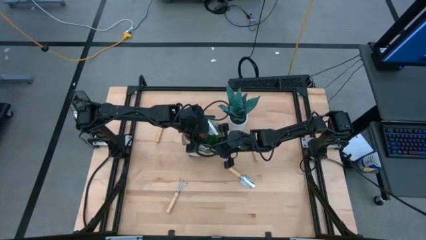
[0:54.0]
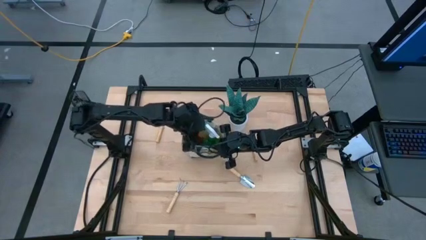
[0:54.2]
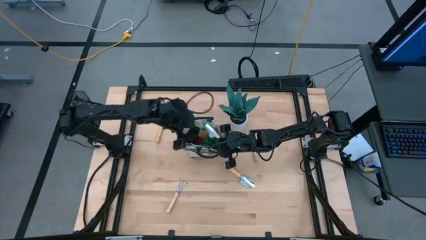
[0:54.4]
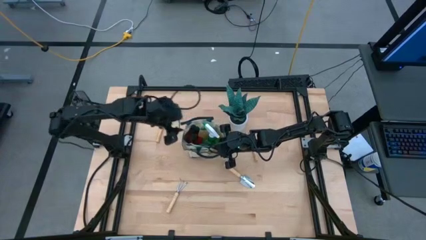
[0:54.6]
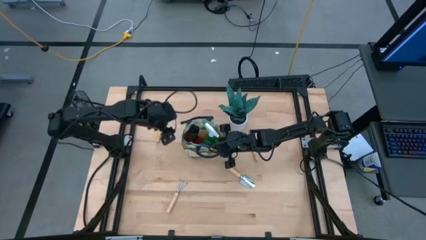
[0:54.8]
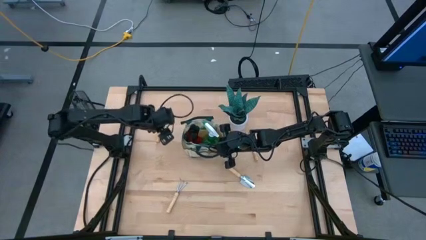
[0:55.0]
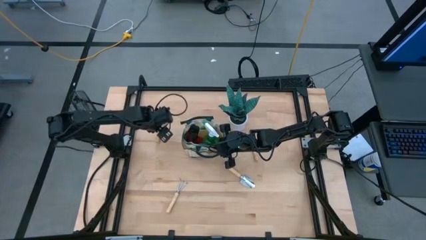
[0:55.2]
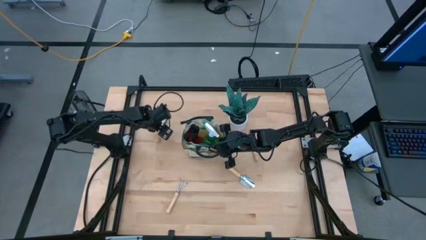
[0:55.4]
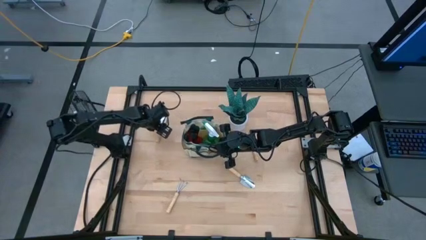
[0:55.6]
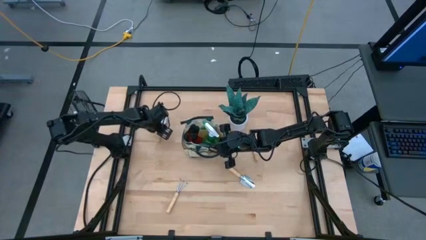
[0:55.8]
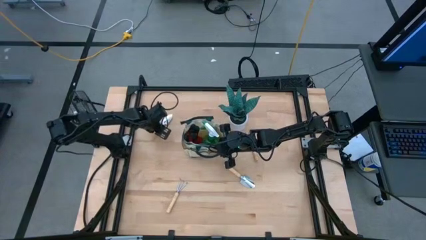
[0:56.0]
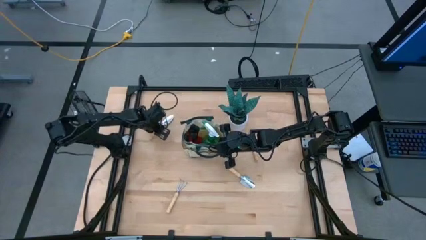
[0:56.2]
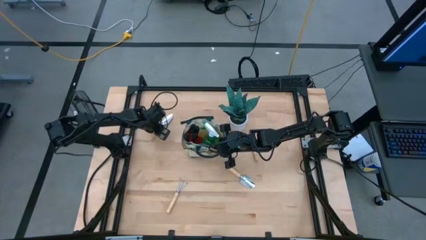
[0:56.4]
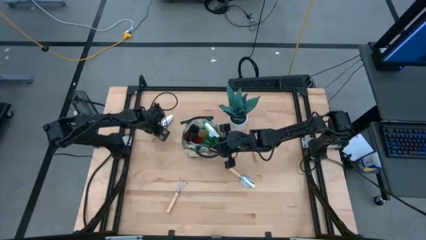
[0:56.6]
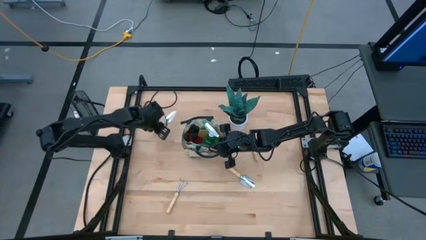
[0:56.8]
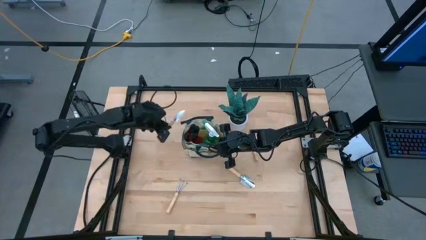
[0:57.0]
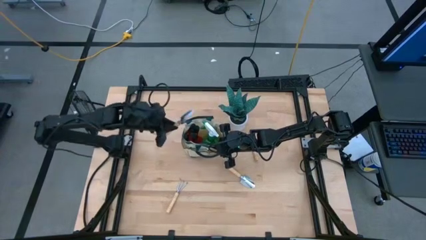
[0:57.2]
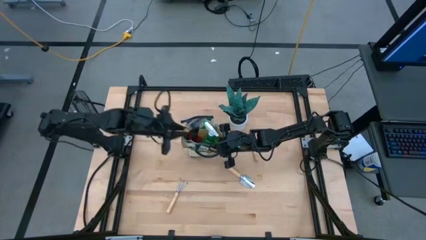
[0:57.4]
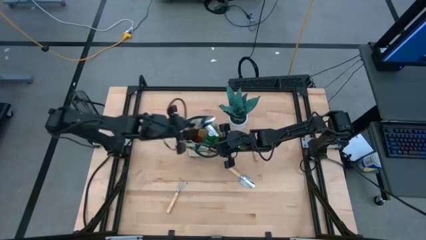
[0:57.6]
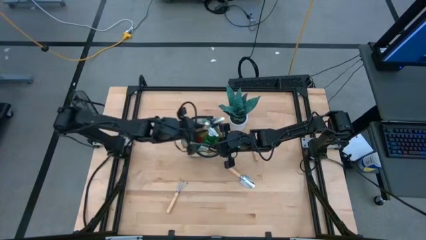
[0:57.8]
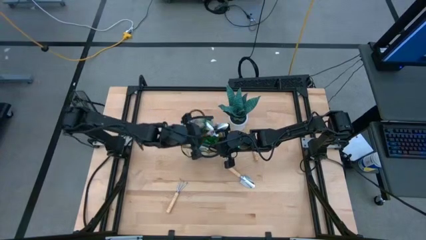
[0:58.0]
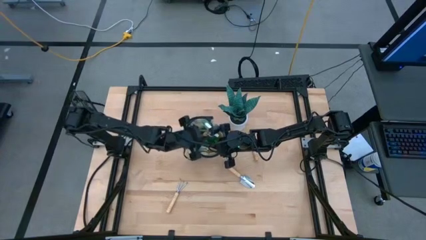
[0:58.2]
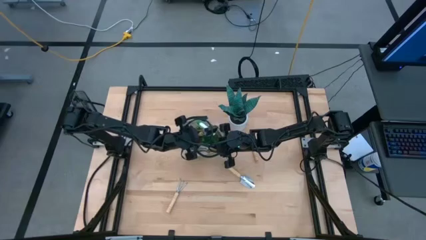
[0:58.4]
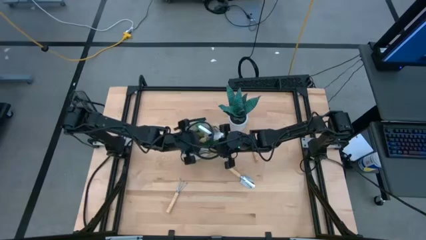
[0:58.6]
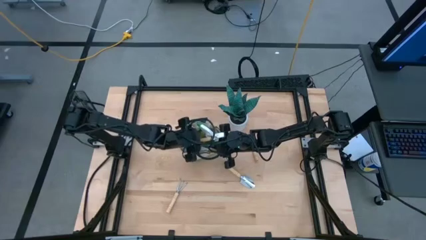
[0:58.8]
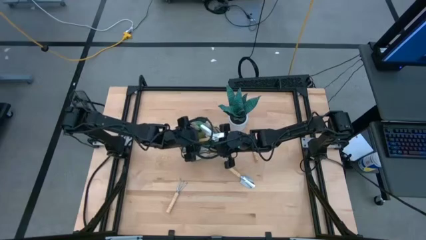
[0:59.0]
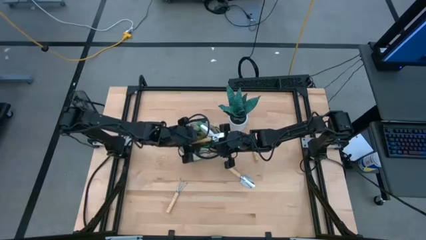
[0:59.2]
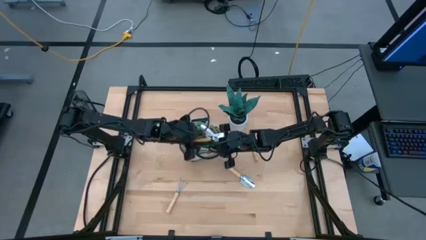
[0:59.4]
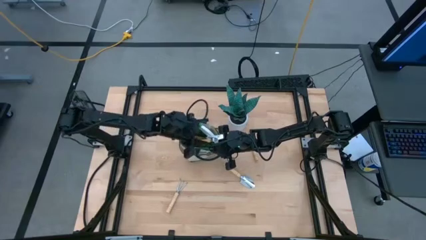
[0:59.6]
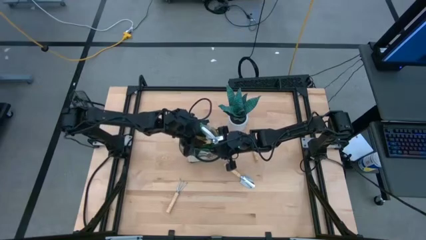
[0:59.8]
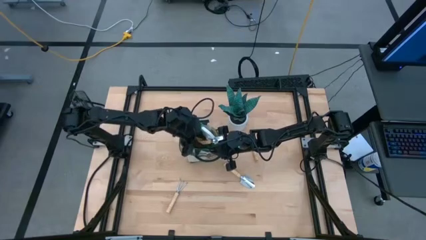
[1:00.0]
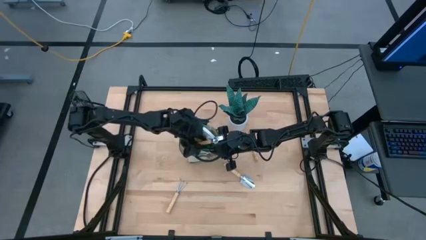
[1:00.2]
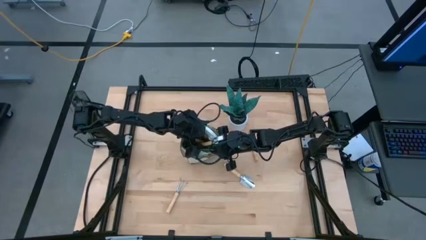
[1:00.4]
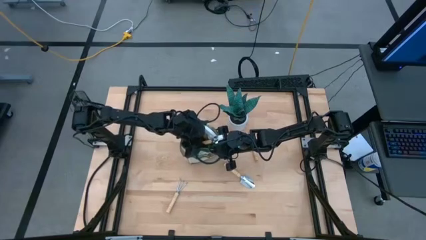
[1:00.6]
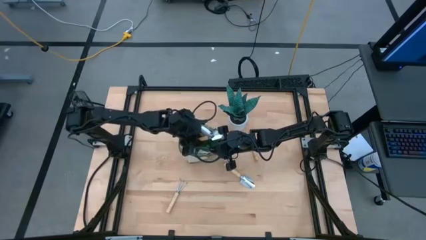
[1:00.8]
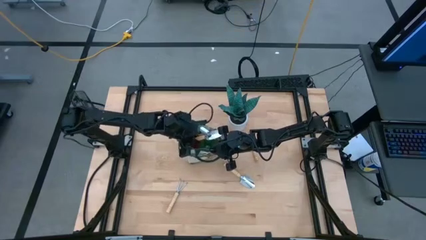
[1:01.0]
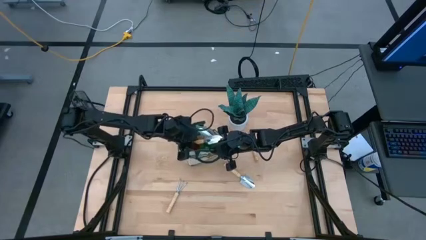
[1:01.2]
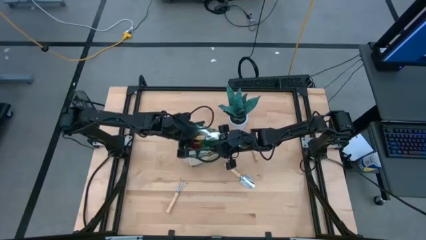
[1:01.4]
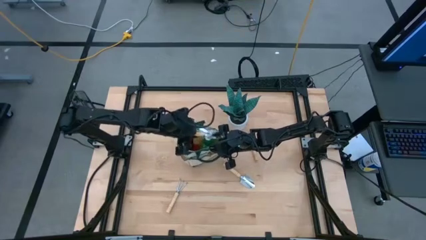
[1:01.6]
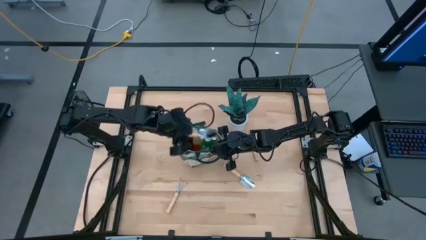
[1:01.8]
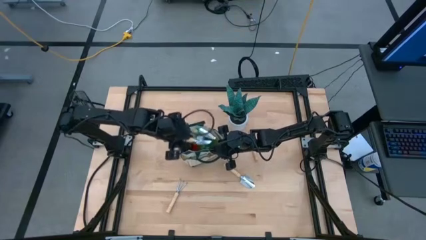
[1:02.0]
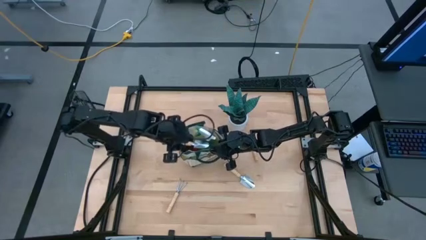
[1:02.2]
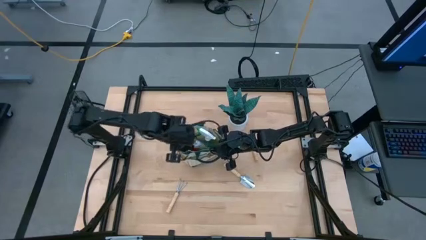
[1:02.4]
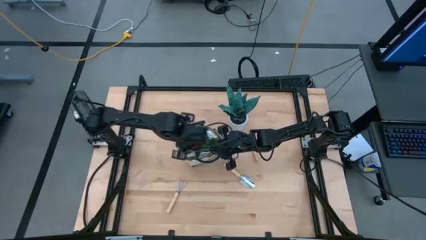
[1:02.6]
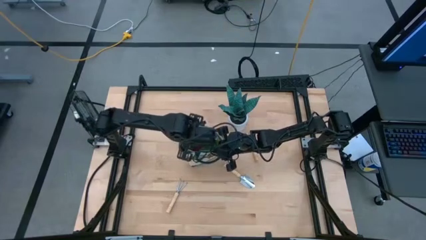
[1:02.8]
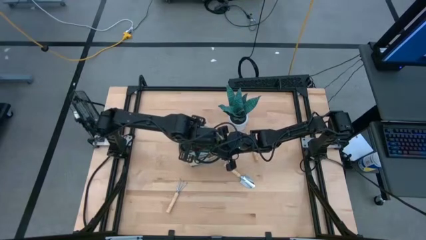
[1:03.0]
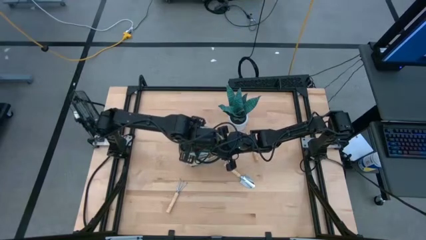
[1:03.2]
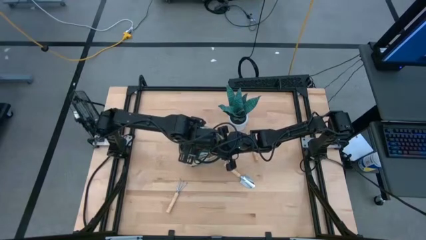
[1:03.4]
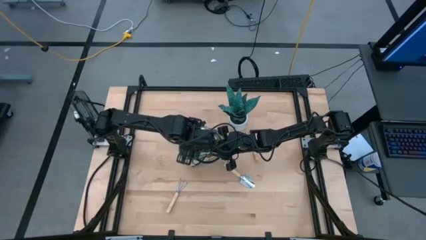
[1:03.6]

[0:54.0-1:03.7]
Task: Pick & Place Garden tools in Gardening bag
Put the top brown trowel into the white gardening bag

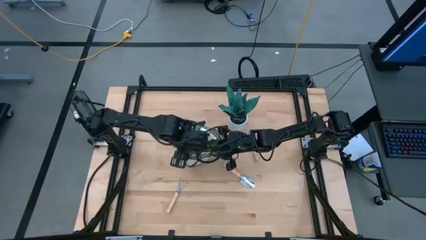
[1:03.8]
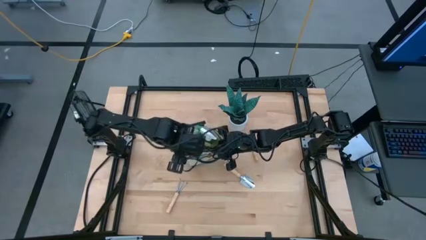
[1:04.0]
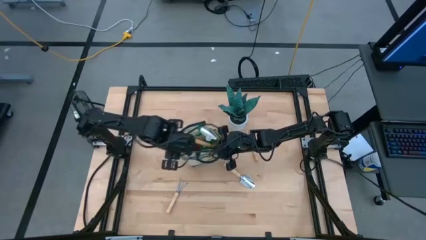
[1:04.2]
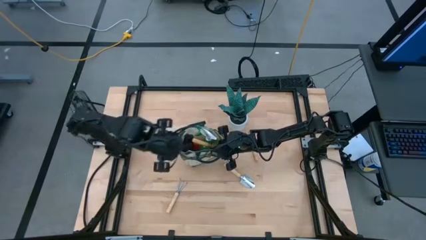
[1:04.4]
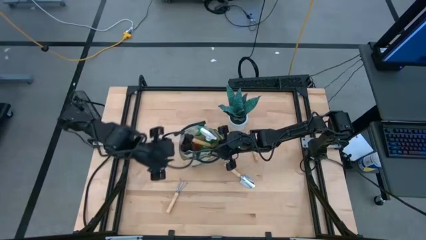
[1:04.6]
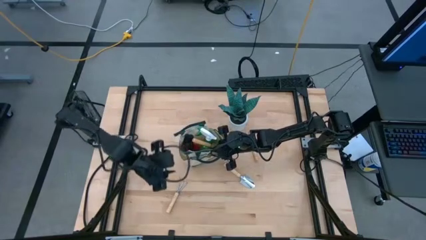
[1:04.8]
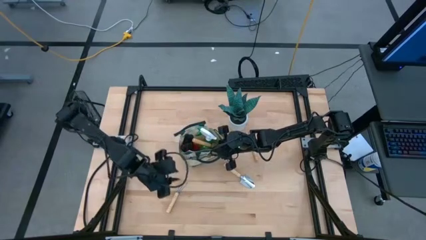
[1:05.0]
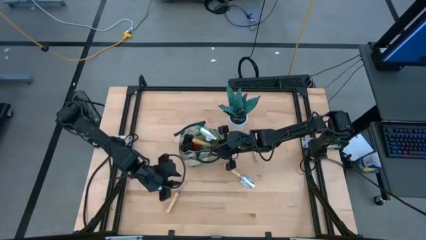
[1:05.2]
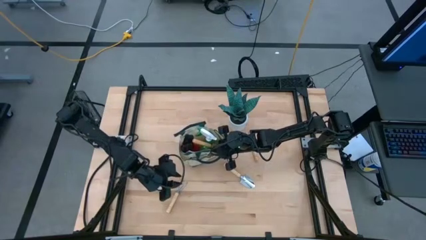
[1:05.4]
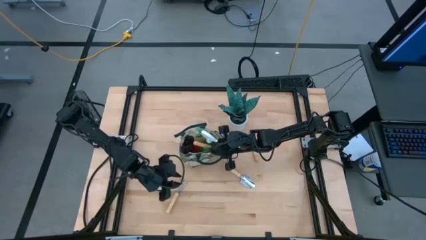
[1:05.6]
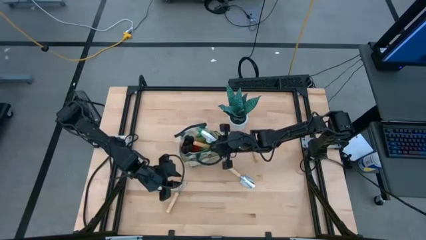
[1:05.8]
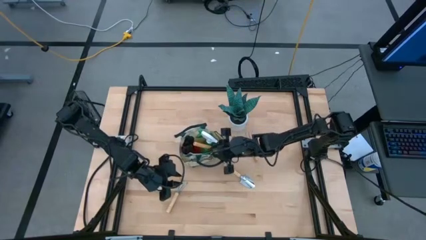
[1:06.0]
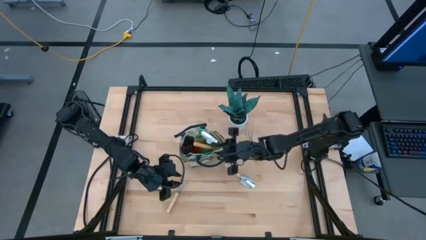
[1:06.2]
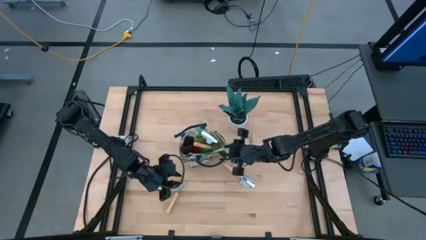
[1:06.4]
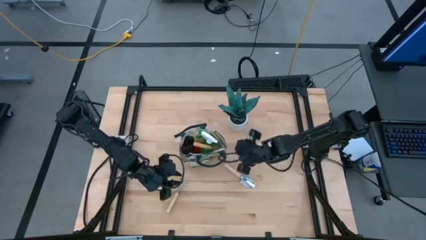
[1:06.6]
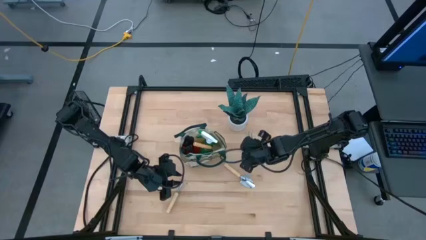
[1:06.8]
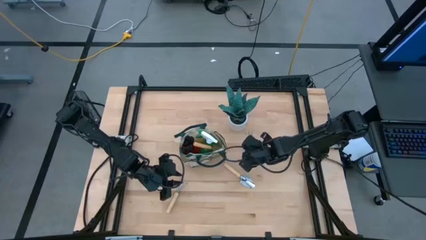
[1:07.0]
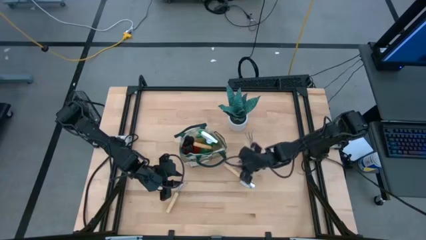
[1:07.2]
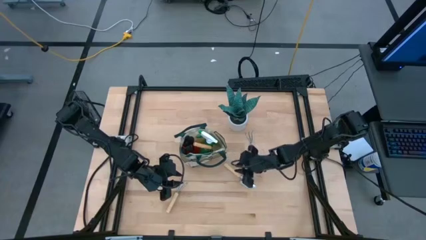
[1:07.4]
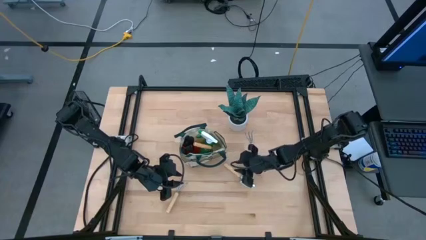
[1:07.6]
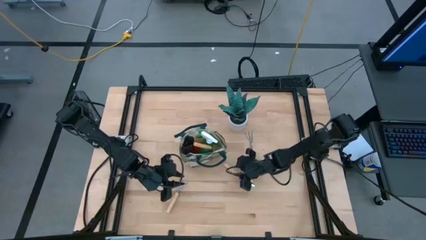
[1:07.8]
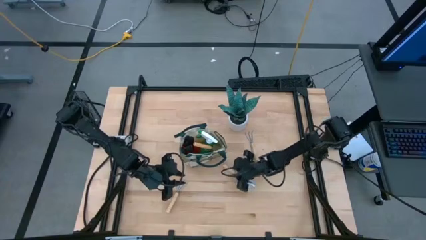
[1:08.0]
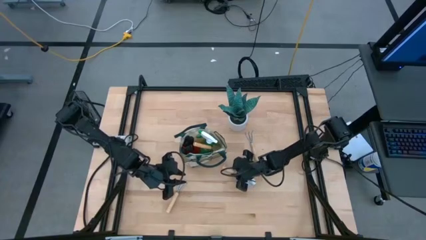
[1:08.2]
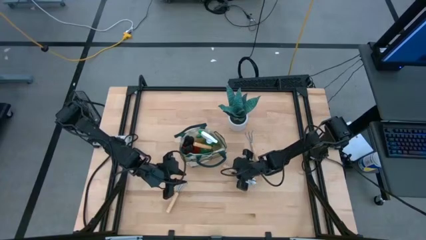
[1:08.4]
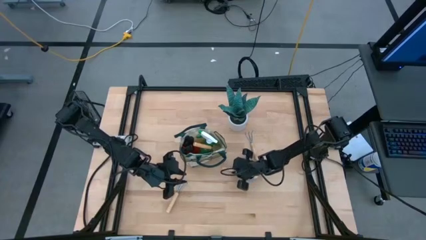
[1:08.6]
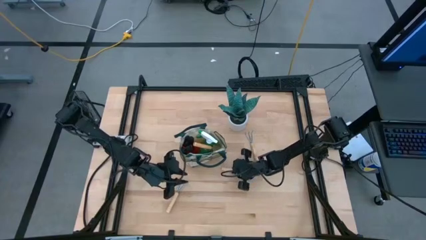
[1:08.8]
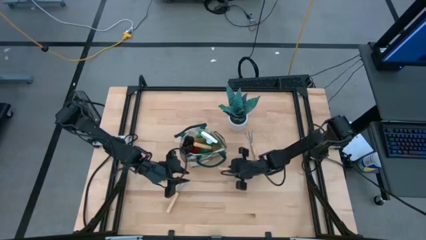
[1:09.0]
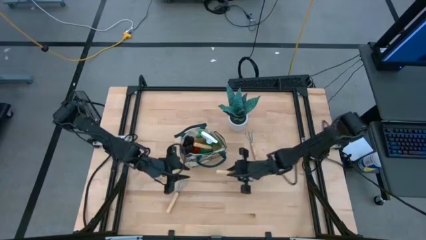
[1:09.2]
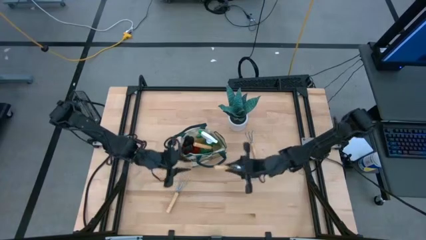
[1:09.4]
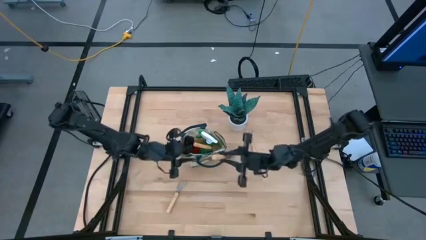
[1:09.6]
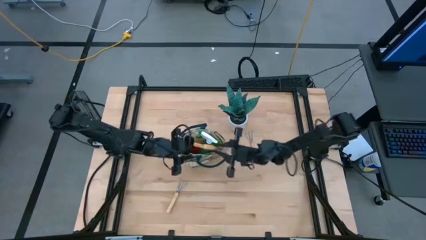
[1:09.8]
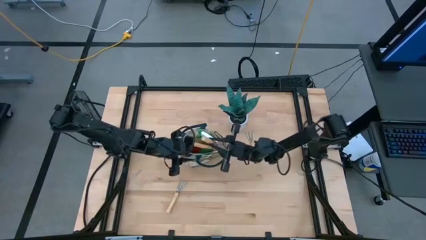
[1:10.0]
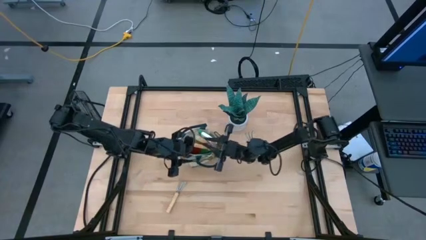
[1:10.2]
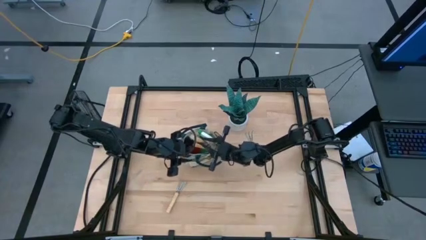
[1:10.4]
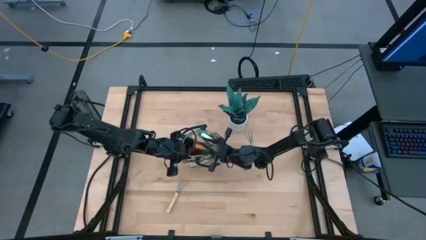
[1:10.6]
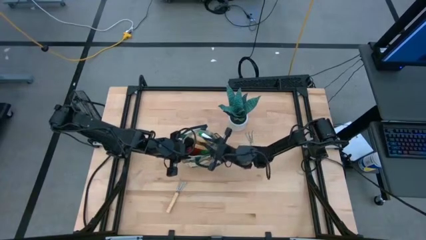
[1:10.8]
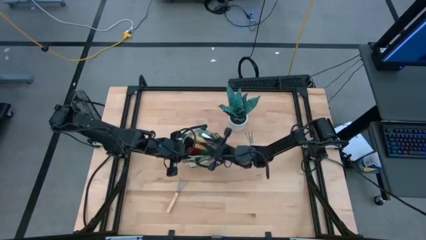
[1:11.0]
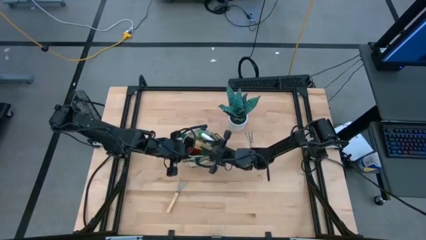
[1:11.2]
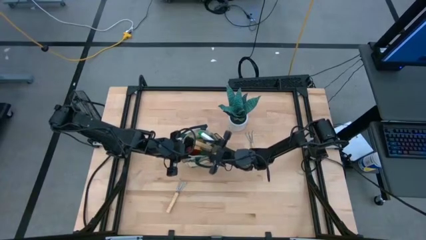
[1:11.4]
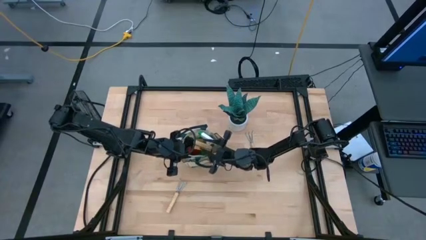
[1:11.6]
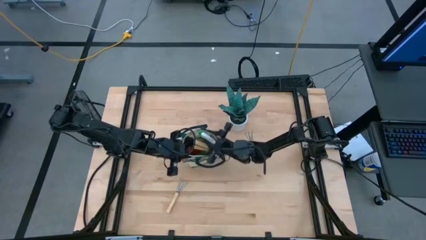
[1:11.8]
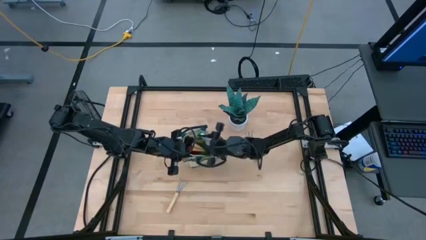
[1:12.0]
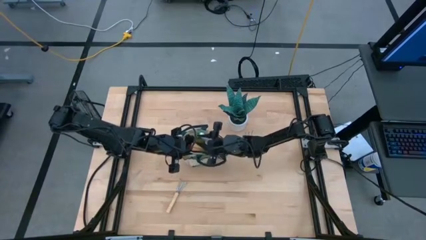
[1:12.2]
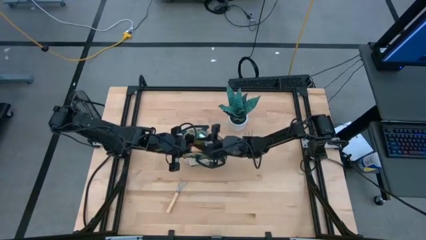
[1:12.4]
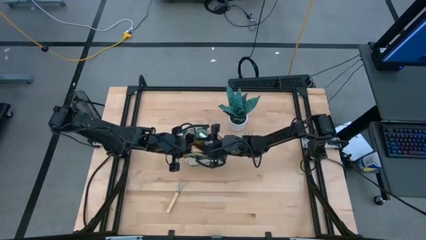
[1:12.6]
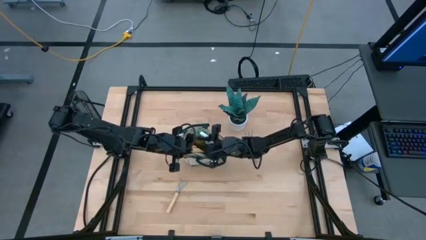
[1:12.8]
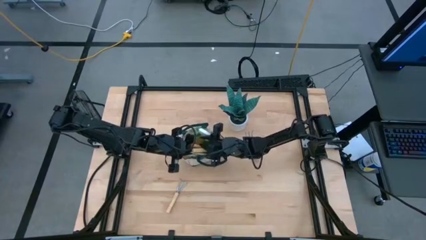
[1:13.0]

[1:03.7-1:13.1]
Put the brown trowel into the white gardening bag
